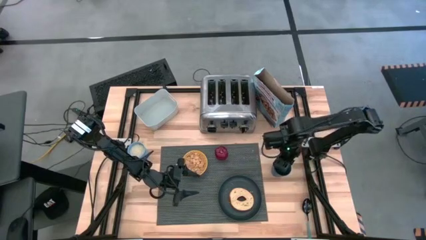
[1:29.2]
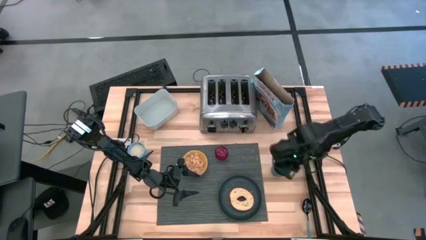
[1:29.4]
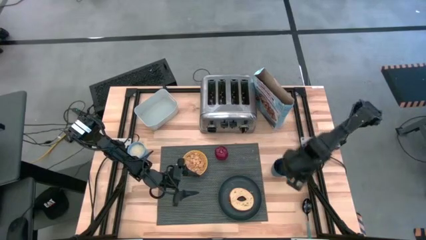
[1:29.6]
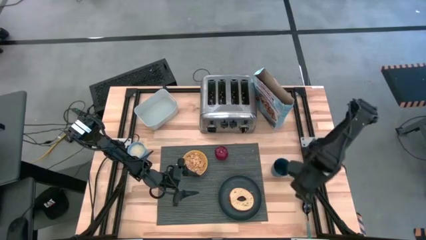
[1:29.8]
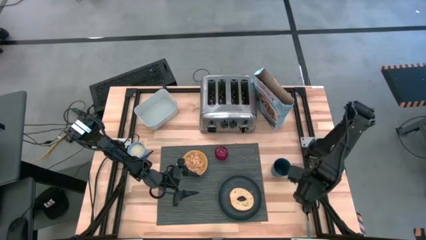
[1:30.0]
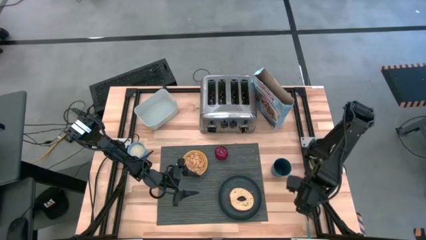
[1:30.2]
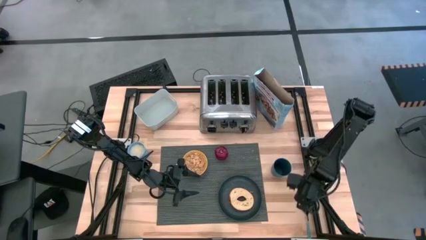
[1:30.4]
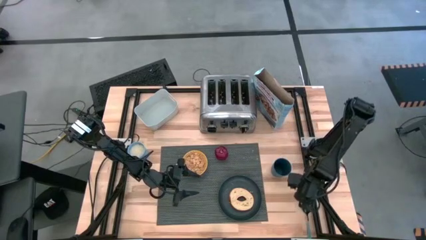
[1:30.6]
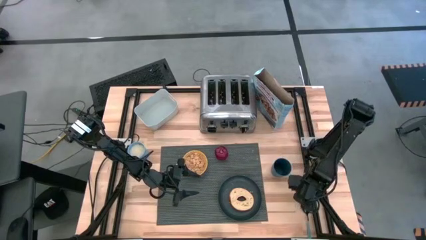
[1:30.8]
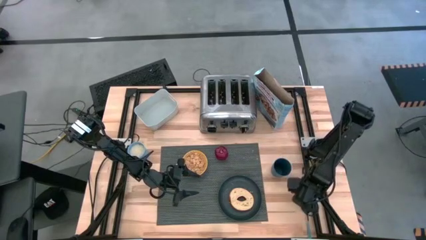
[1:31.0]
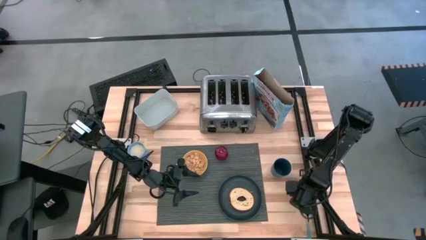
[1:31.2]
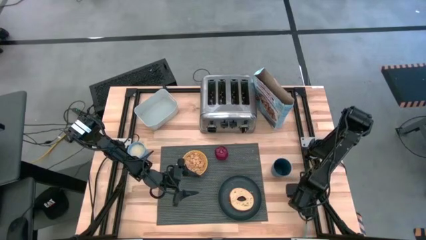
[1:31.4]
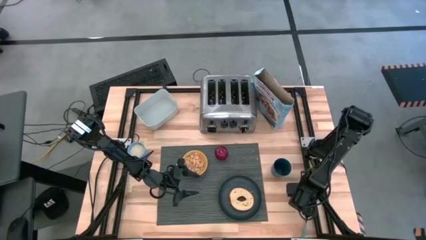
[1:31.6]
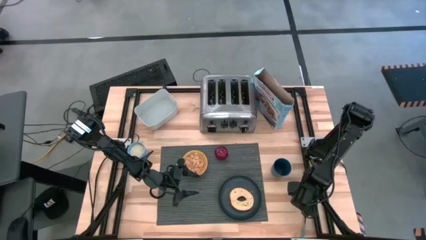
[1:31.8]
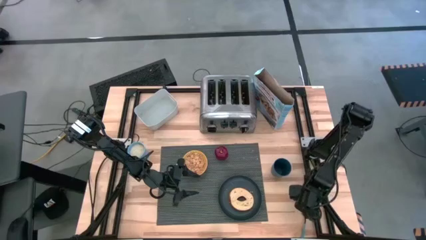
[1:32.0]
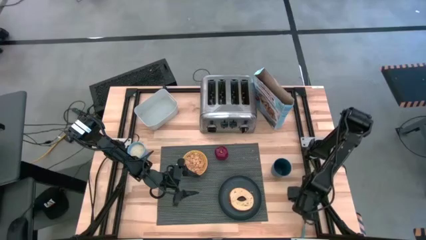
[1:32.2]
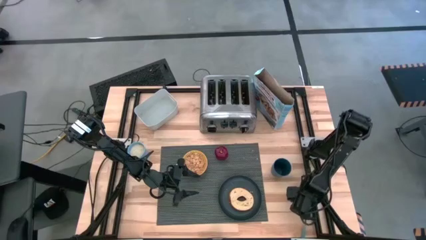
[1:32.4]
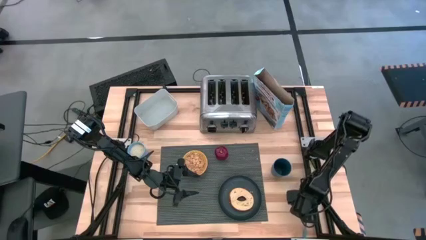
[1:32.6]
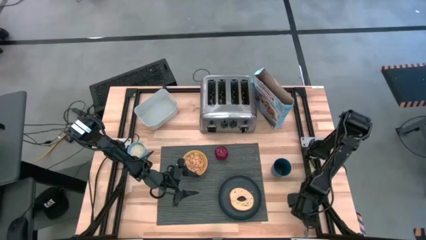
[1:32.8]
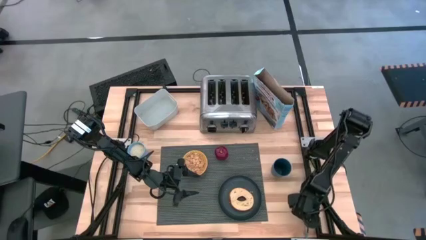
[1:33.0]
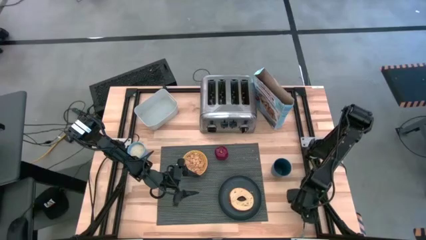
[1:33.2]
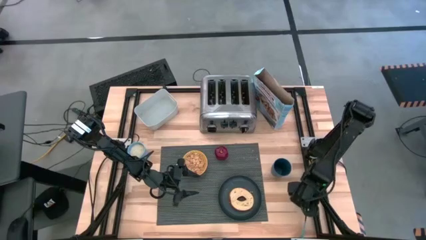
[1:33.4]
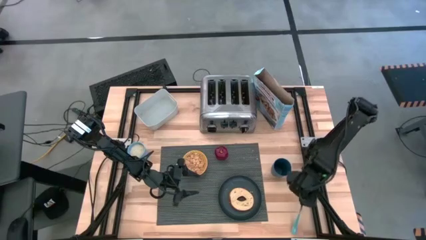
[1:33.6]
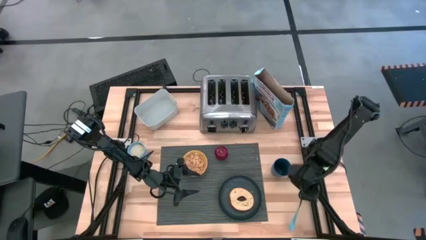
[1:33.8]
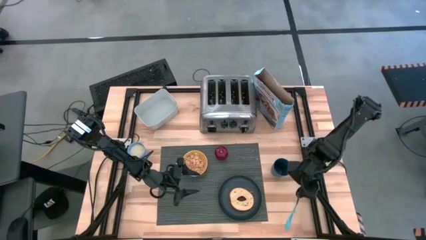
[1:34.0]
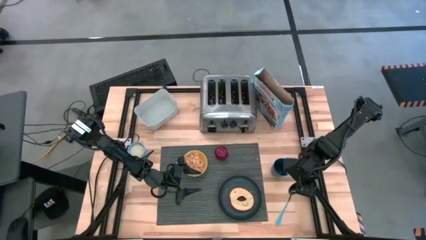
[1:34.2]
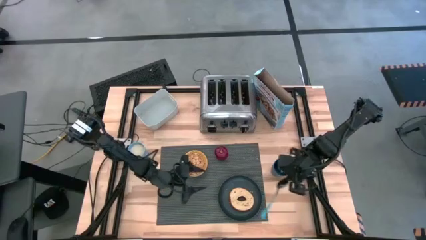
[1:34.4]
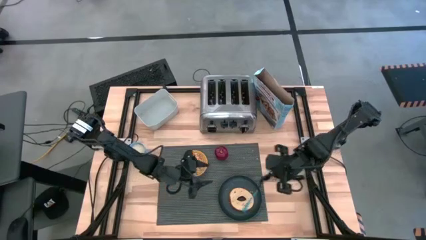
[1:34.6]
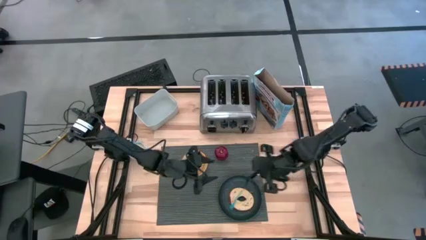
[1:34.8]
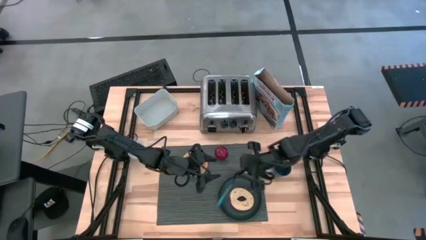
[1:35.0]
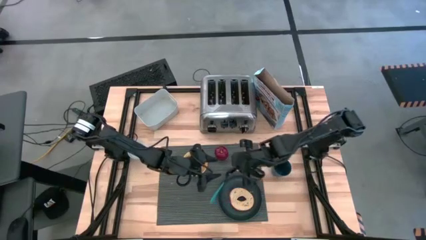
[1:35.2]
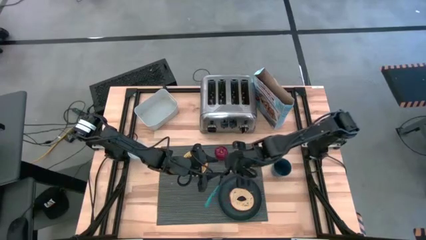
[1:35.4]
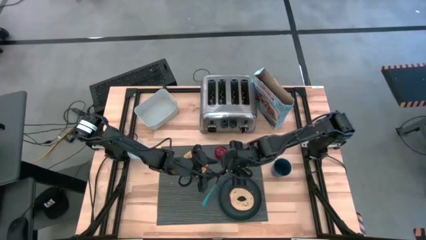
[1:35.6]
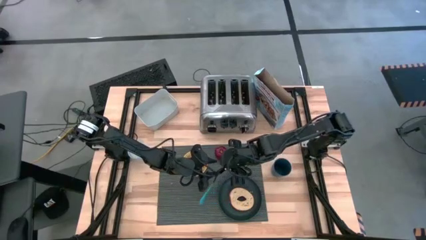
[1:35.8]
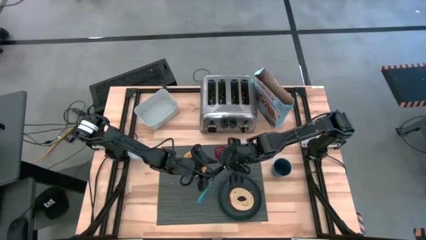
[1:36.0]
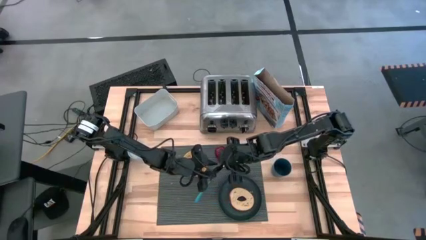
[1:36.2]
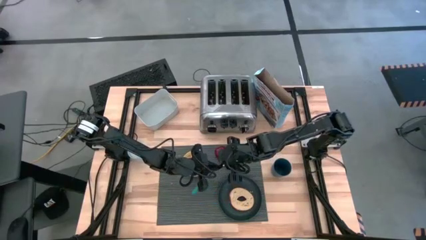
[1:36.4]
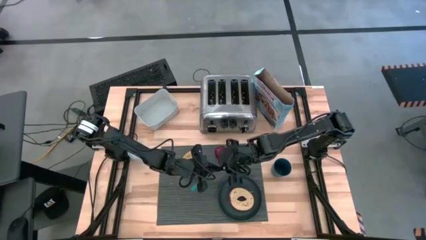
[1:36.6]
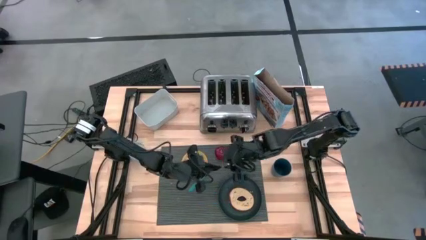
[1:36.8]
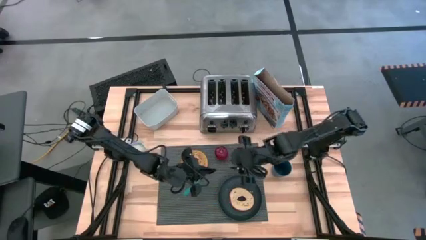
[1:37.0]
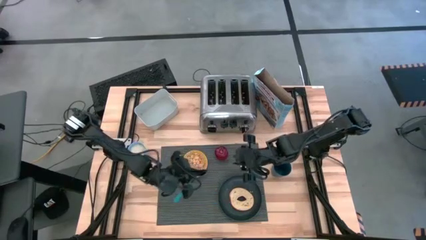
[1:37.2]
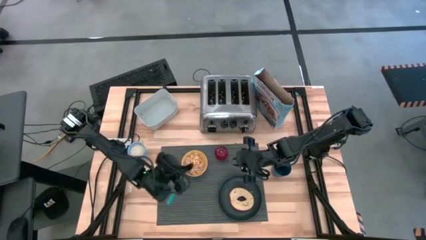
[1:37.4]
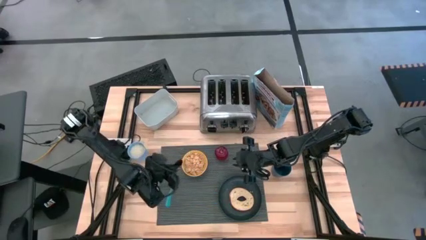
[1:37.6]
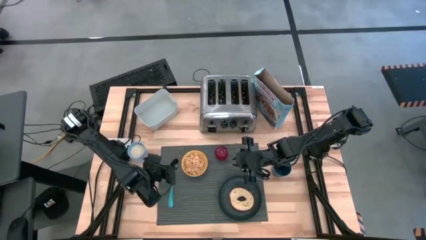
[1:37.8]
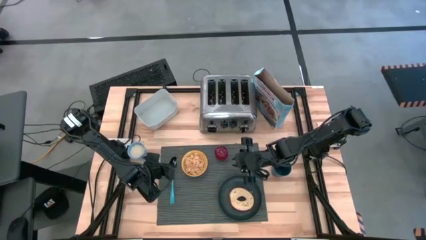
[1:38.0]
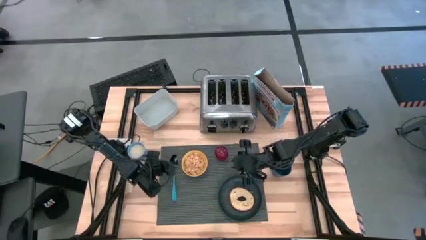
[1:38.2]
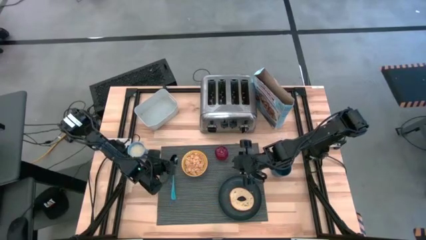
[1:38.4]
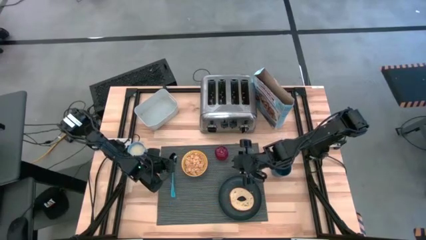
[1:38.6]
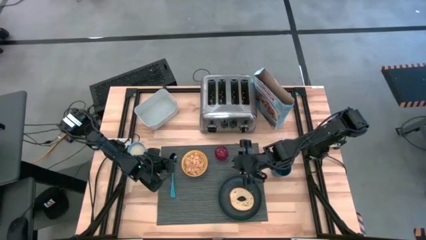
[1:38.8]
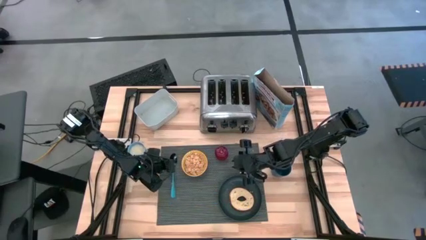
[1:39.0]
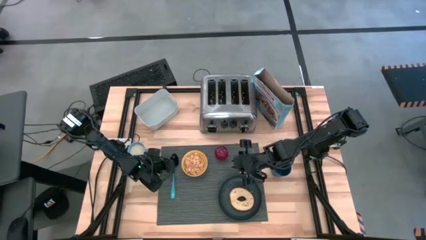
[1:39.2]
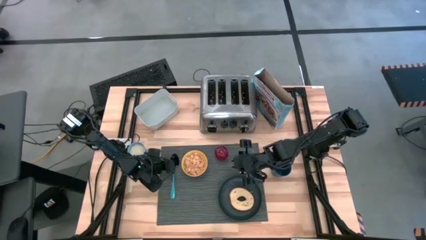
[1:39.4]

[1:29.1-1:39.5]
Task: Arrange a breakfast setting
Put the blue spoon on the gray table mat to the left of the yellow bowl

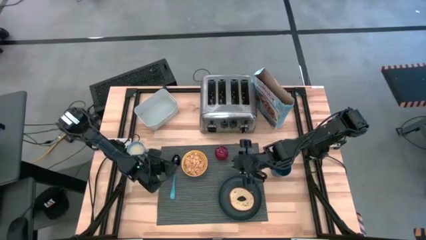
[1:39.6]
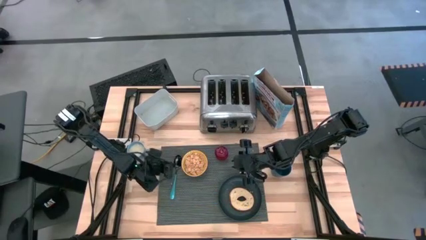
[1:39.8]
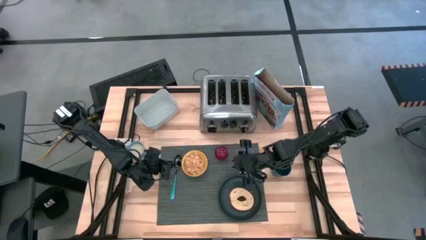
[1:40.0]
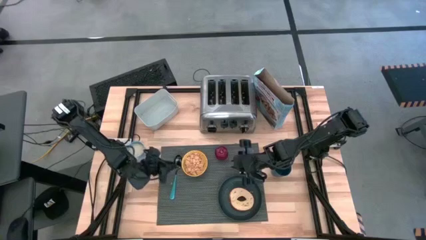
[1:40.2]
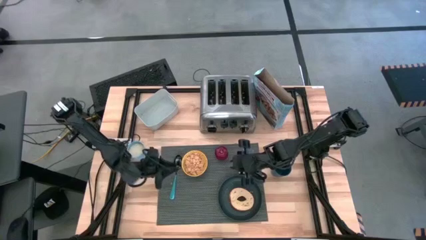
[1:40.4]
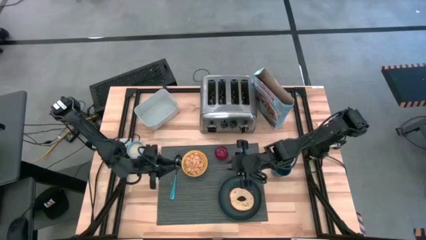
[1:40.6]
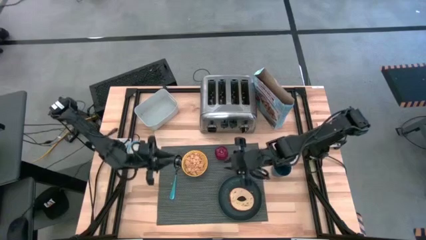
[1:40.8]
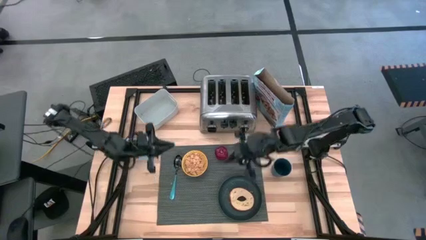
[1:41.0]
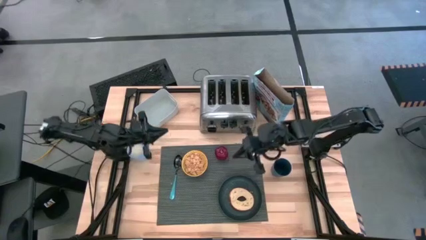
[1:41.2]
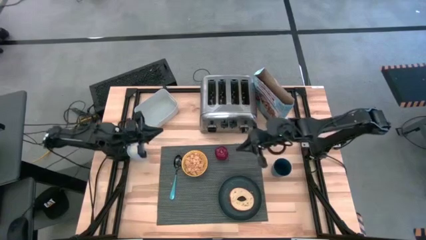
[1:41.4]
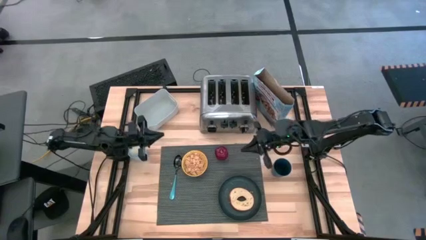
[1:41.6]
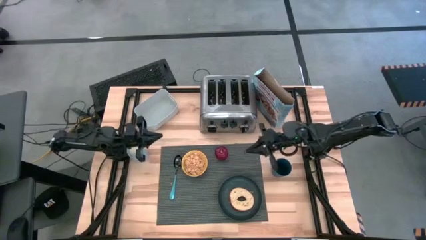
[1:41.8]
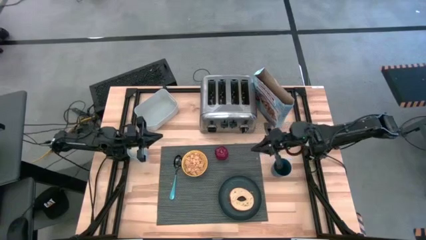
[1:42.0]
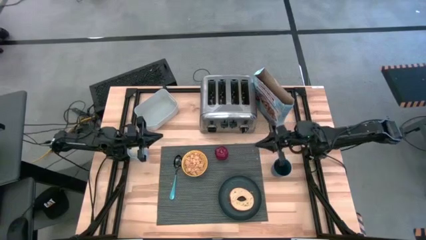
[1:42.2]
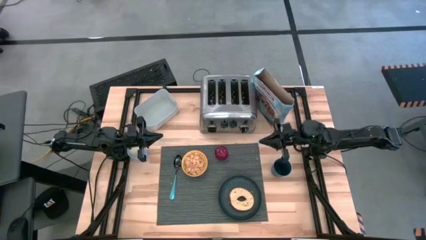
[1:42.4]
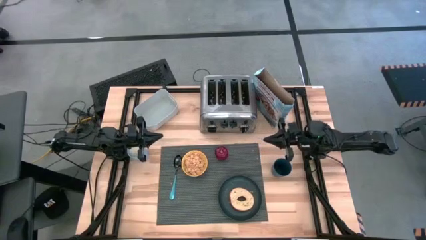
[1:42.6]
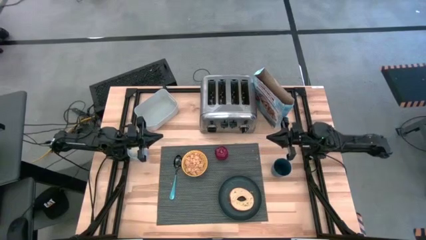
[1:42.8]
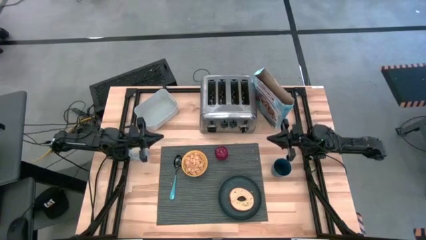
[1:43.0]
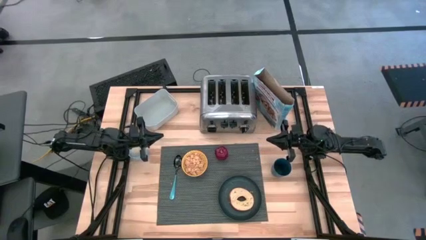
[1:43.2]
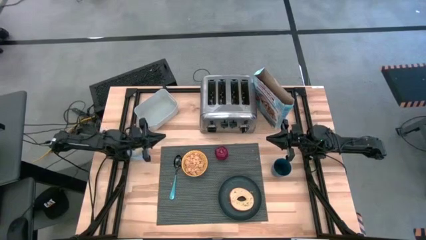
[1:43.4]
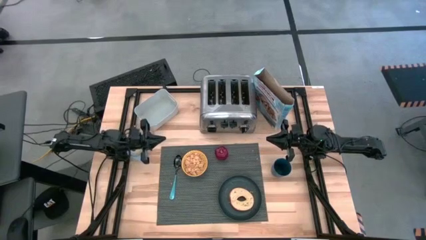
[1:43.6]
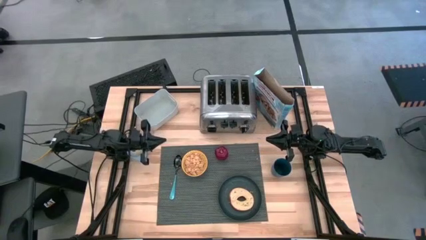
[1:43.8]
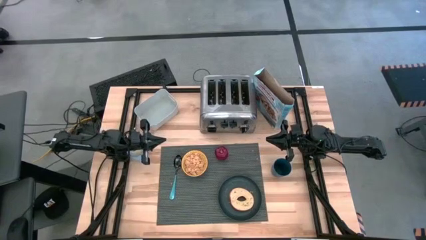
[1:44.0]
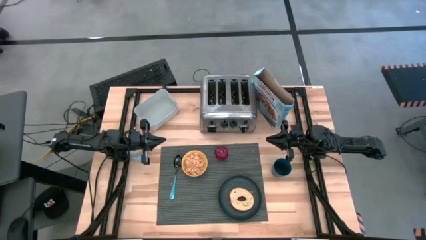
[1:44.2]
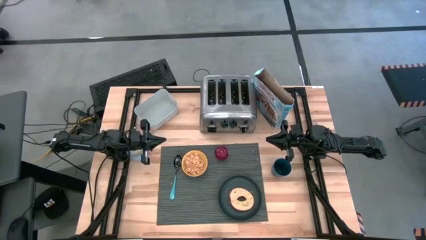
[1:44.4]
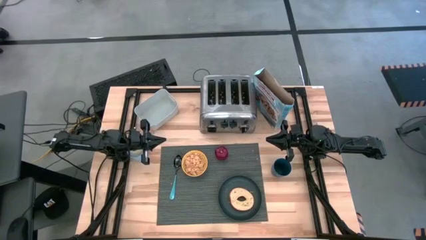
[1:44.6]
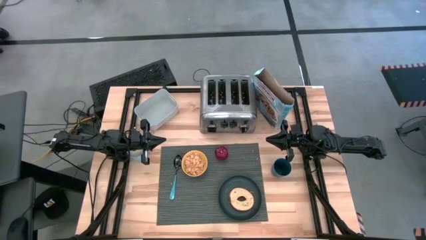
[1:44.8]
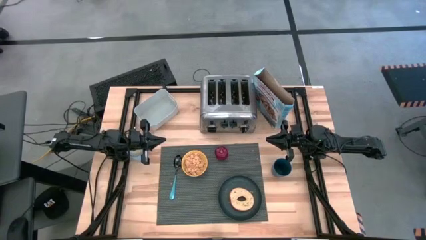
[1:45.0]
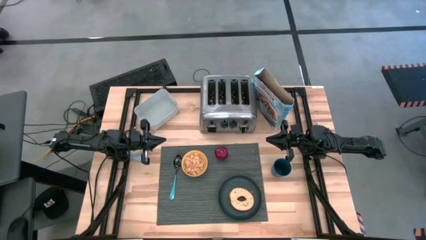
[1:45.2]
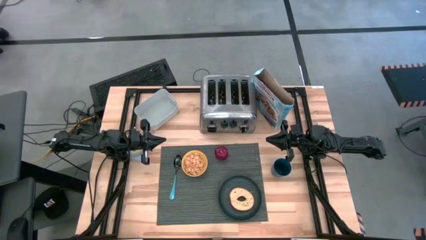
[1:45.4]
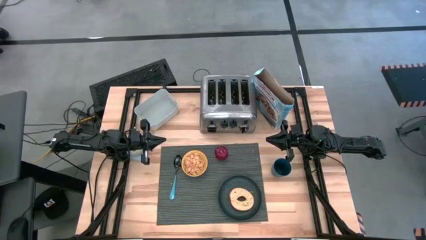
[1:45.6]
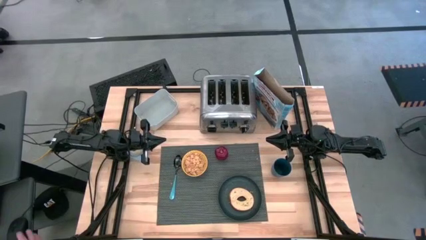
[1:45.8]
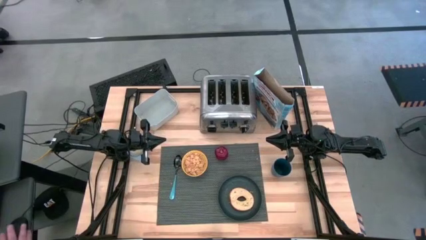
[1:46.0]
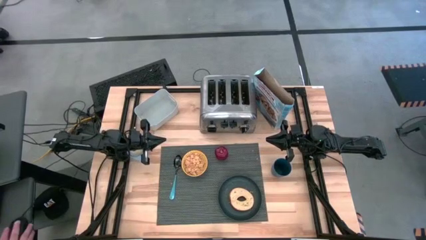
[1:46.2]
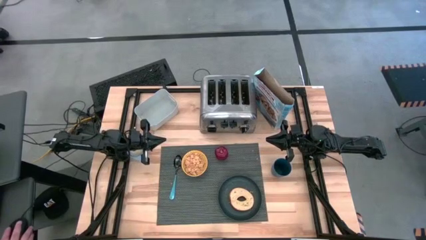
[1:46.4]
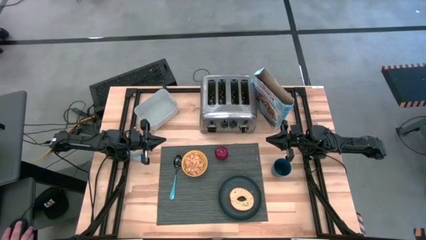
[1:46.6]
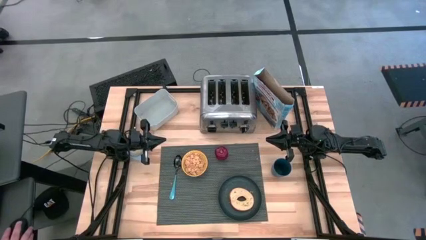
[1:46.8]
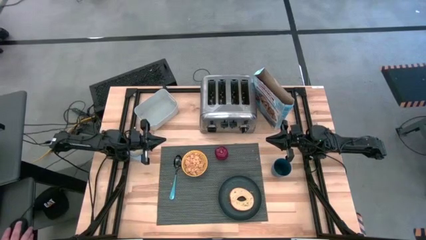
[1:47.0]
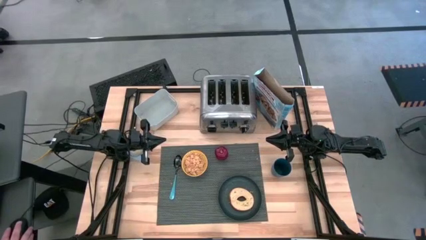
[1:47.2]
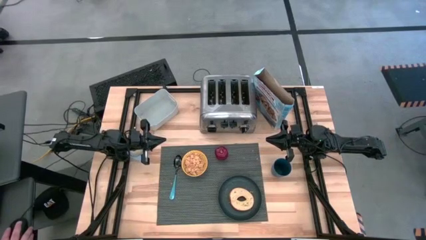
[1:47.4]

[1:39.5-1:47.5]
Return to Home Position
